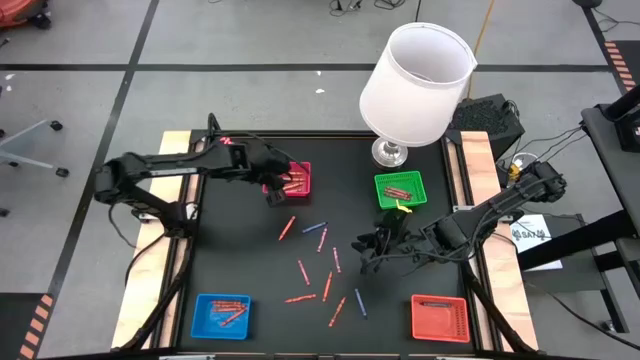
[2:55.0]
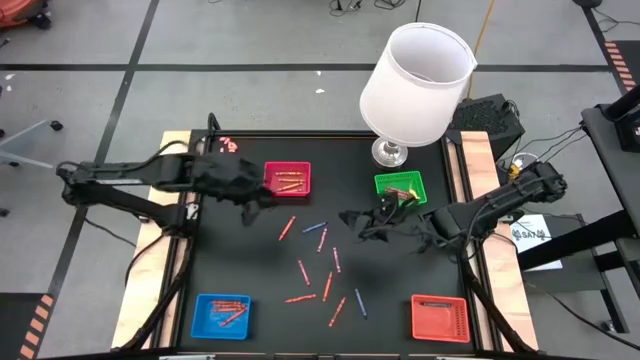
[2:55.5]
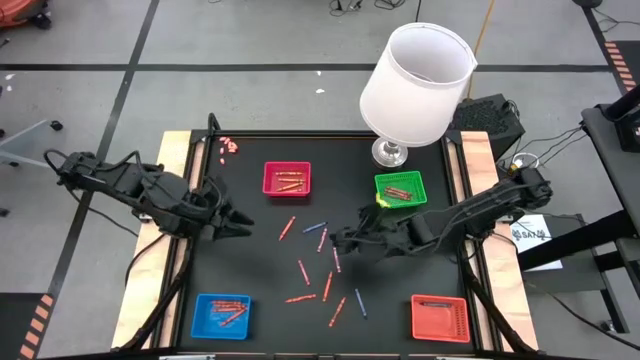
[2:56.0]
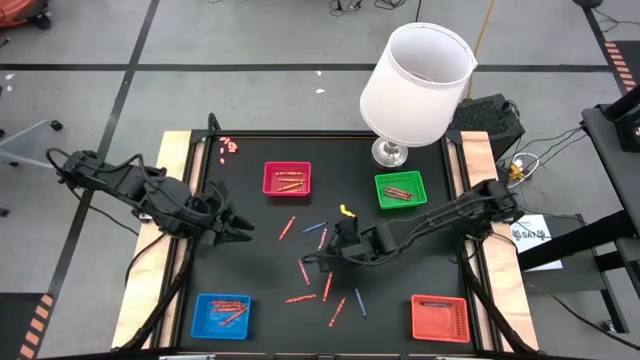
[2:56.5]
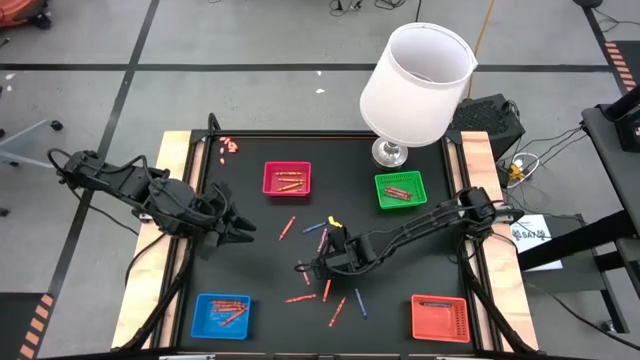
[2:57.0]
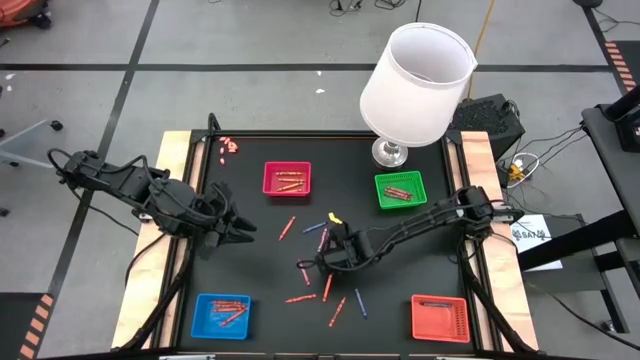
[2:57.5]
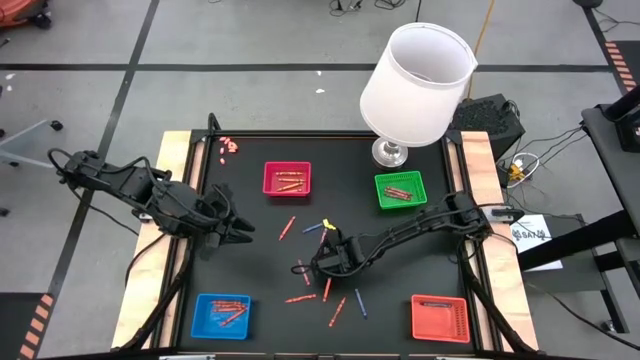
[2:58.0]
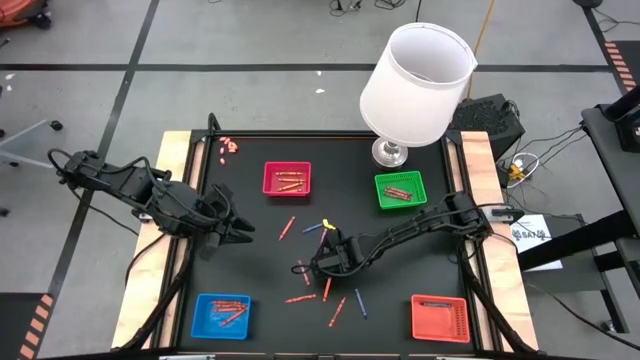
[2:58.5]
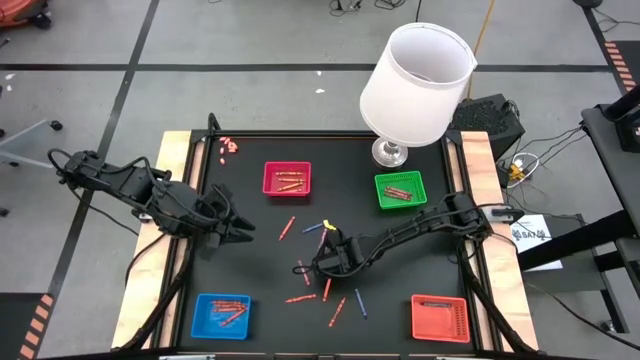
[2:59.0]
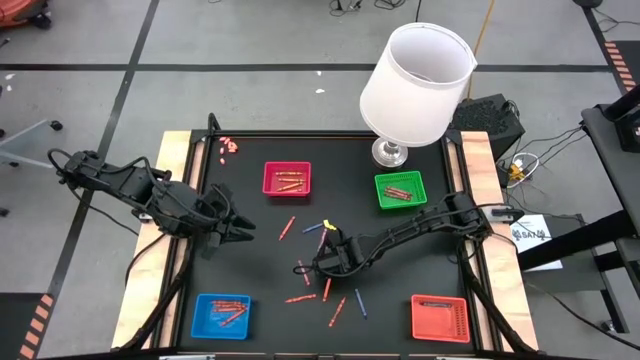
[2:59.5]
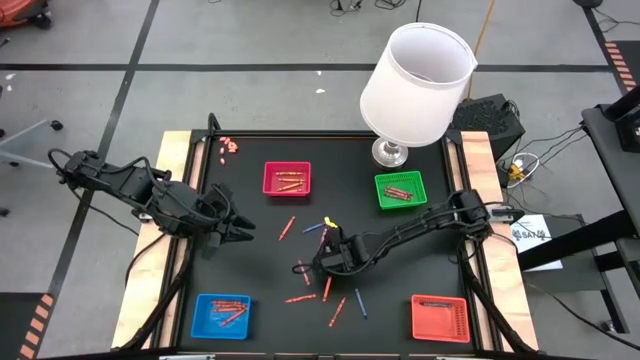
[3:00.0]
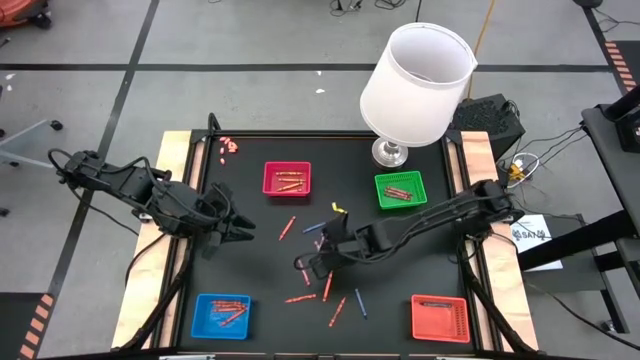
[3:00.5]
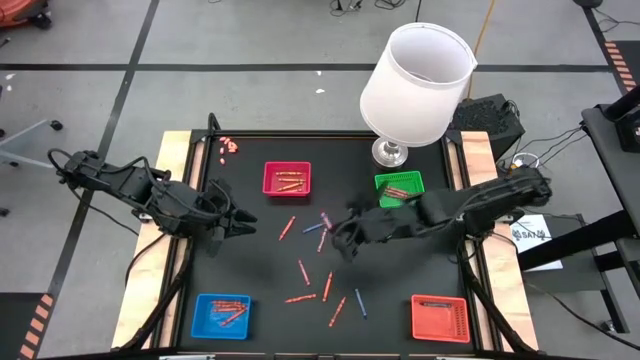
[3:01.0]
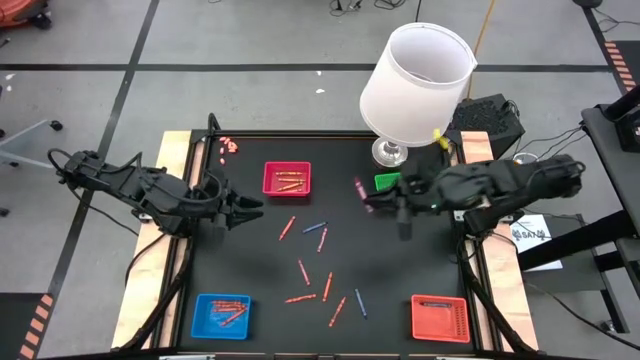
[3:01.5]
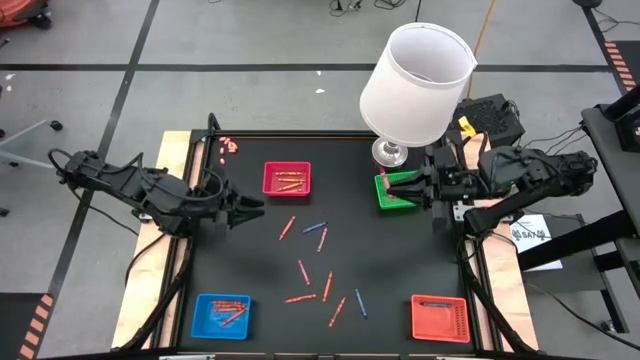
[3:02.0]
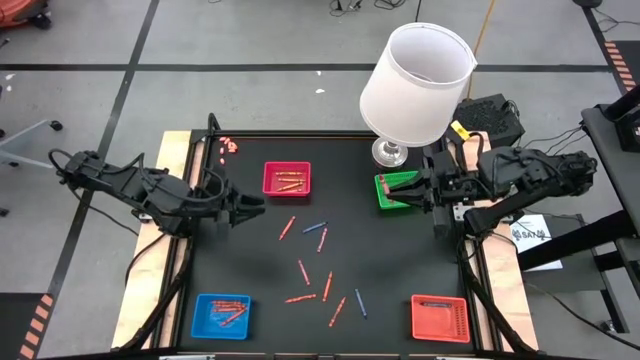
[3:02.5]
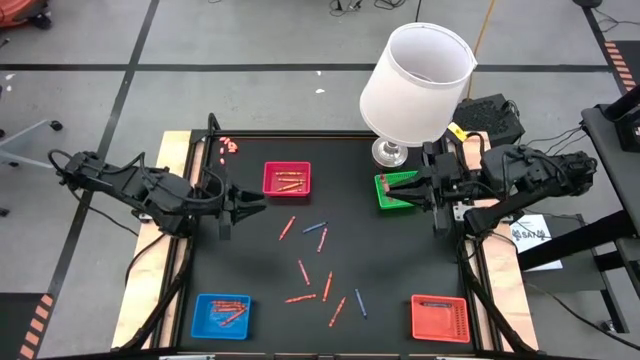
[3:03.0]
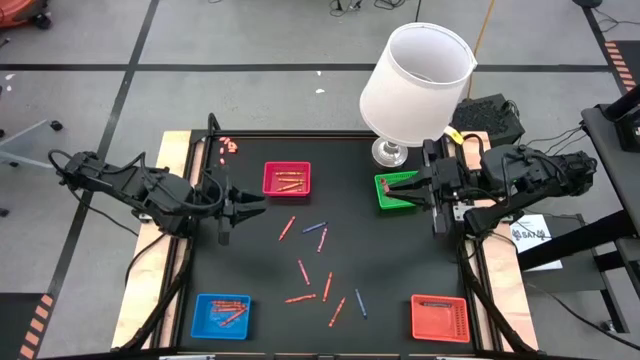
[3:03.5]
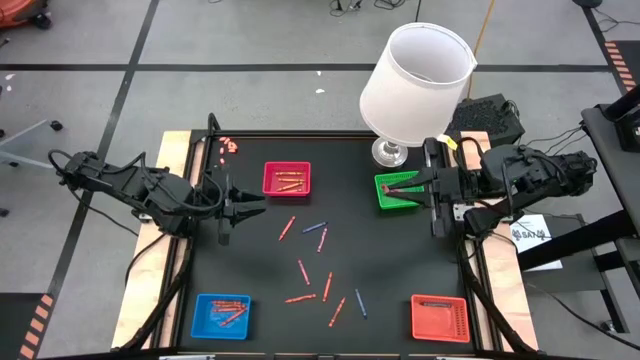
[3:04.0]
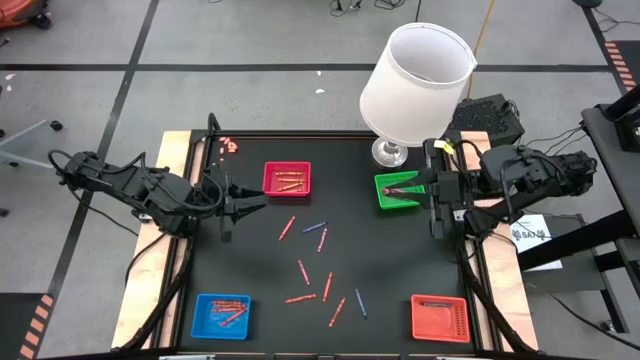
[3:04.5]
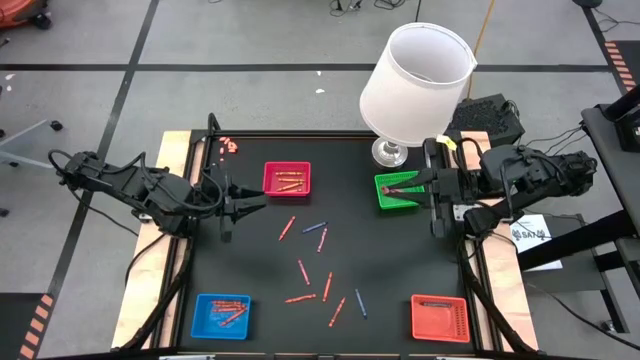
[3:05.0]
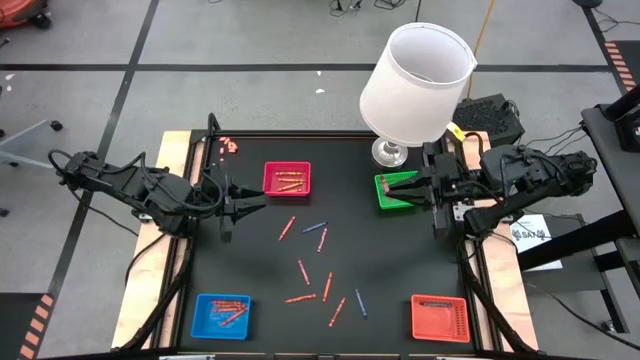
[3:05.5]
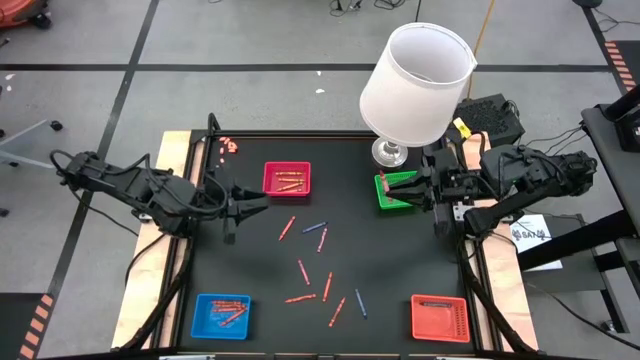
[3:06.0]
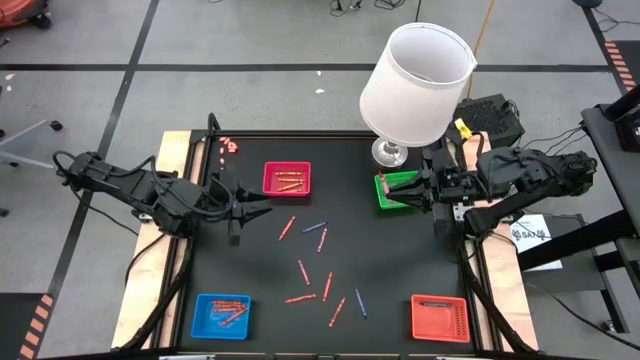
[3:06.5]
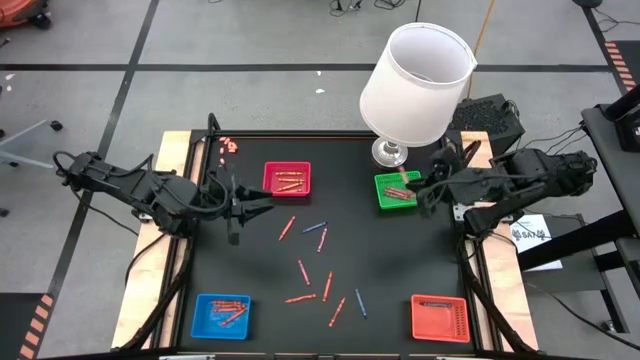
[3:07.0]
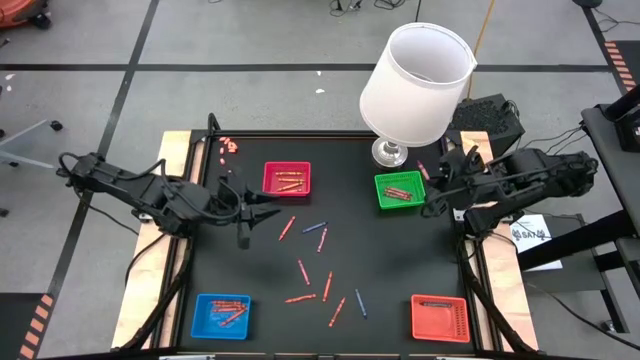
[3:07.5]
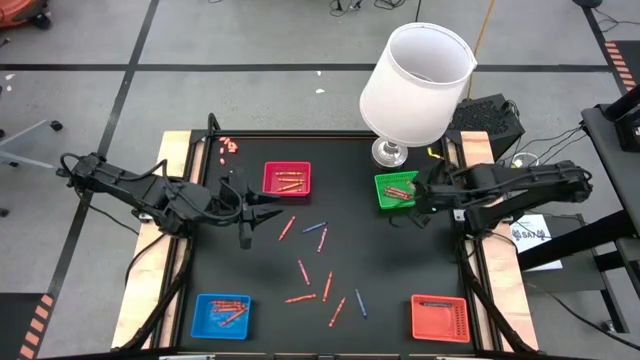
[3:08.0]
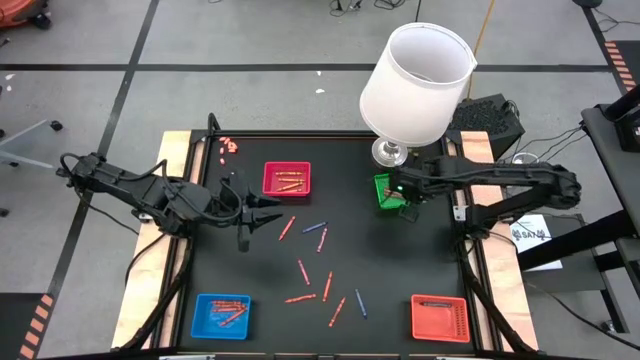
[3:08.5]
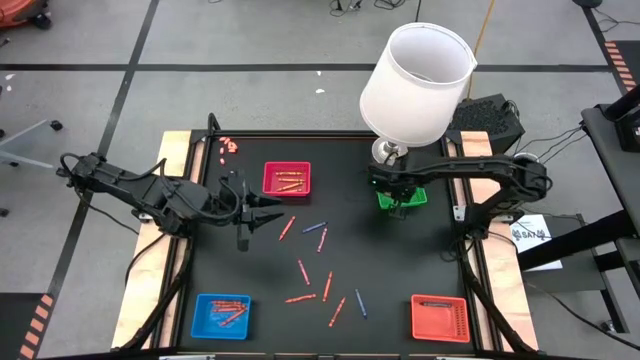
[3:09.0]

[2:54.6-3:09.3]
Task: Sort crayons
Put the red crayon into the green basket

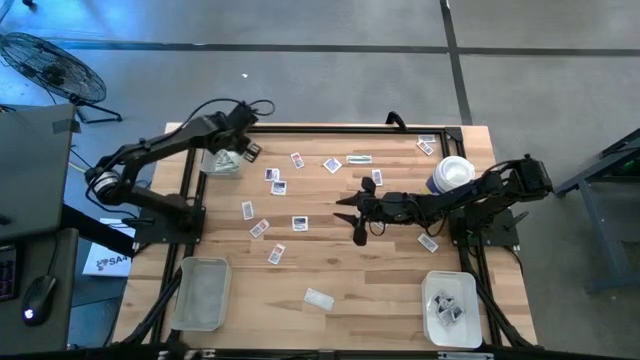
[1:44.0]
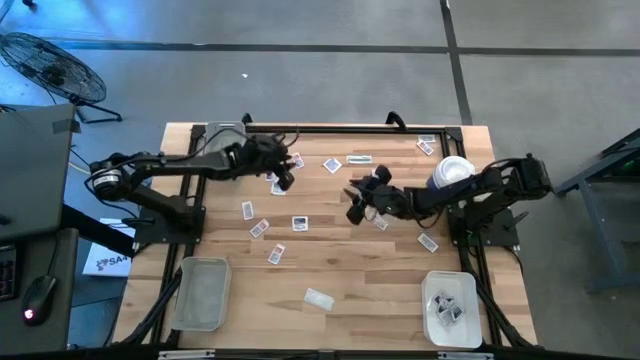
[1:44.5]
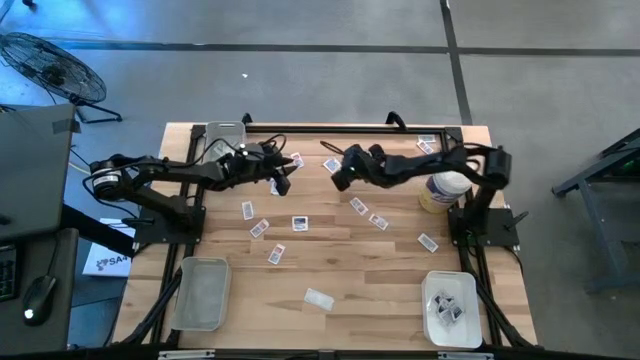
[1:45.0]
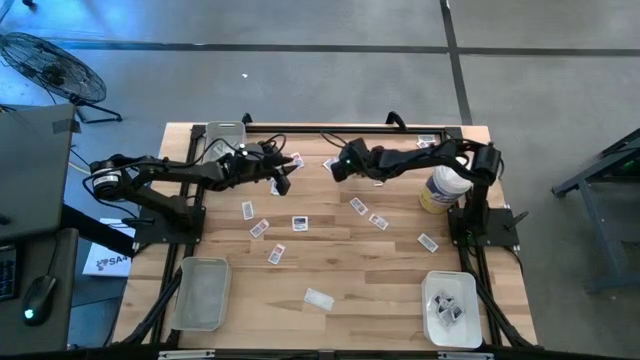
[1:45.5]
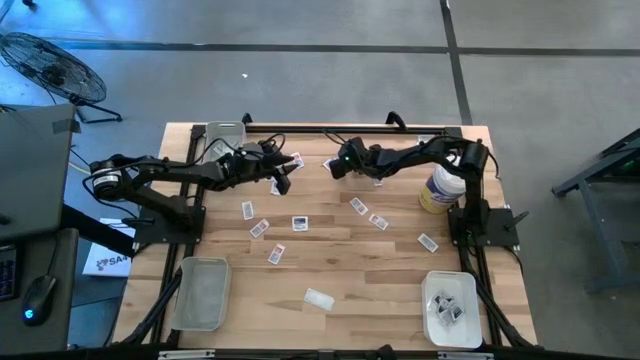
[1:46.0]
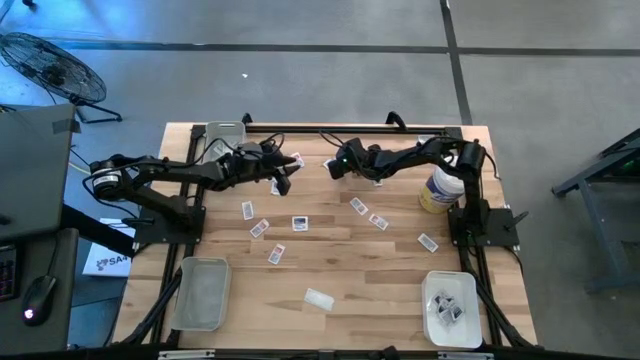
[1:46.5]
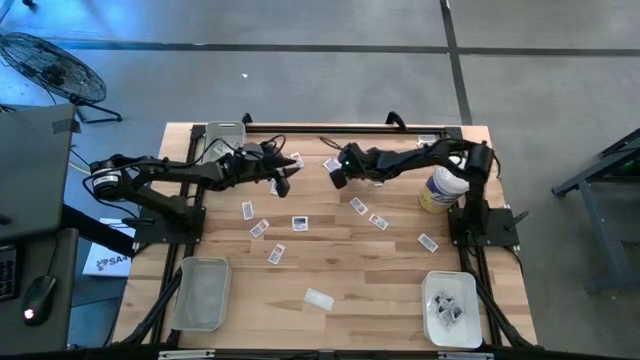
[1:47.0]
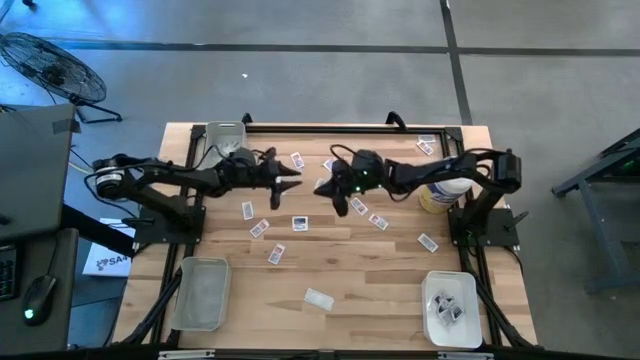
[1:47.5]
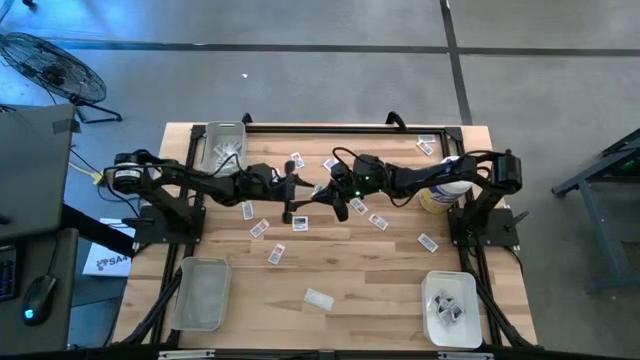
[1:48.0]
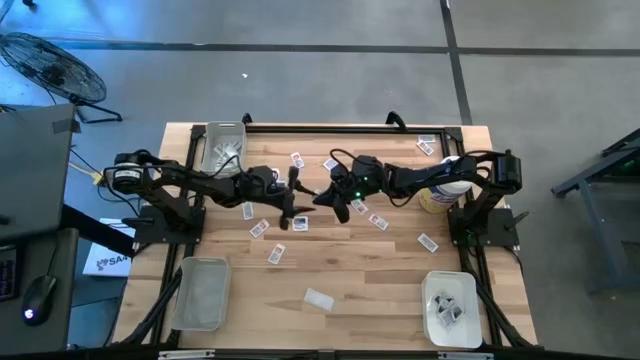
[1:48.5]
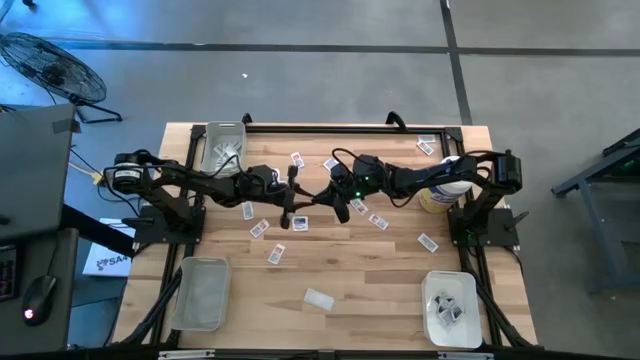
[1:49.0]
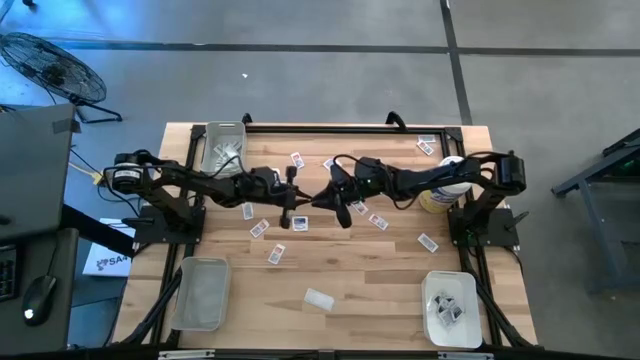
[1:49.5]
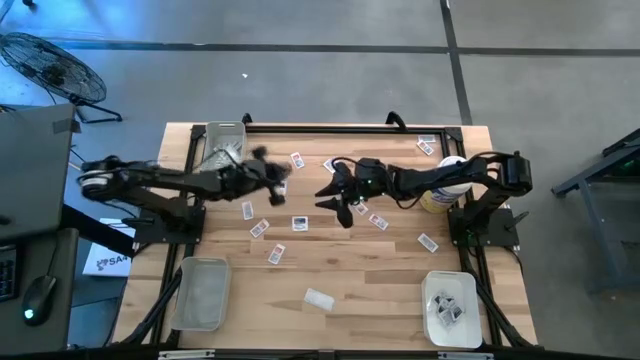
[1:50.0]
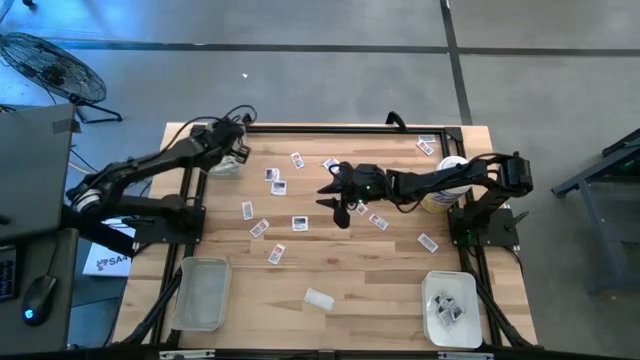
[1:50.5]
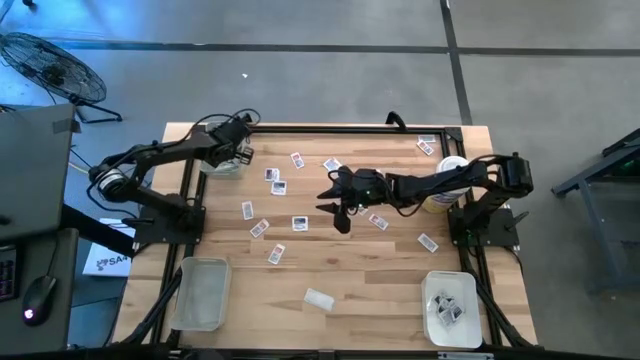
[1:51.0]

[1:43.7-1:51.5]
Task: Pick & Place First Aid Supplies
Put the top green bandage pack into the top gray bin
